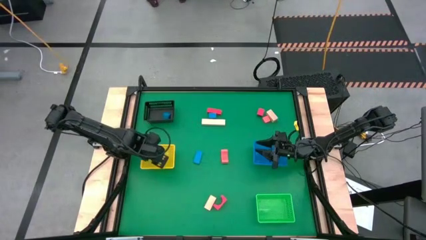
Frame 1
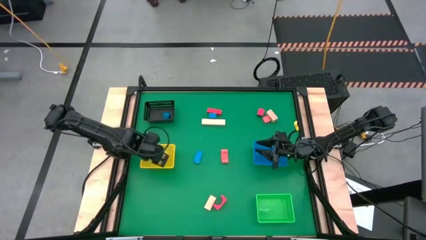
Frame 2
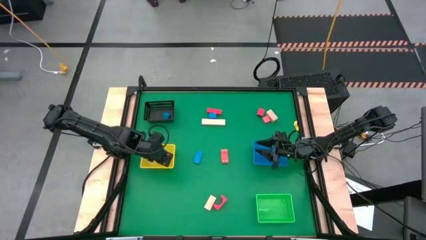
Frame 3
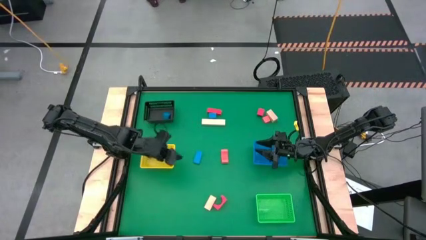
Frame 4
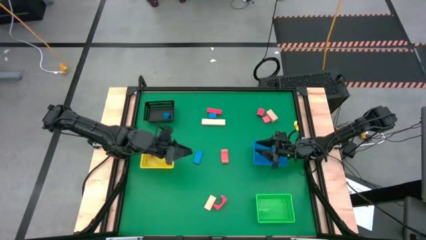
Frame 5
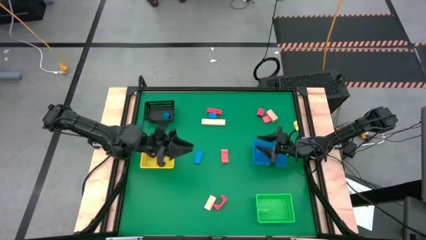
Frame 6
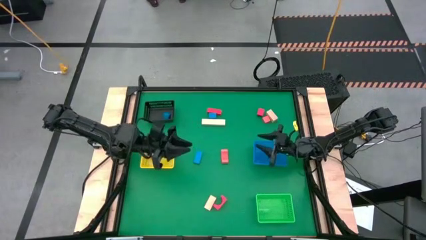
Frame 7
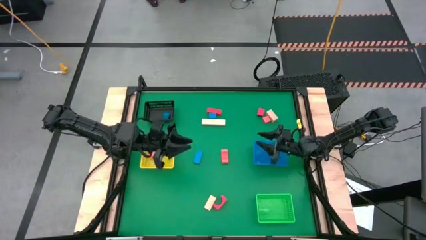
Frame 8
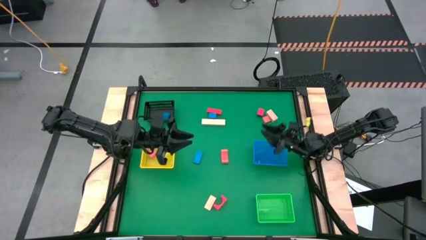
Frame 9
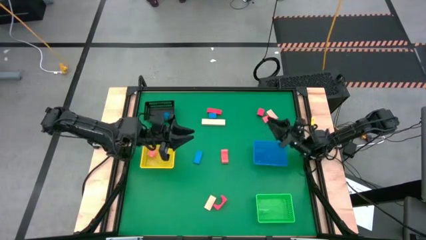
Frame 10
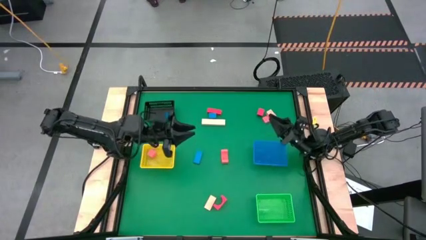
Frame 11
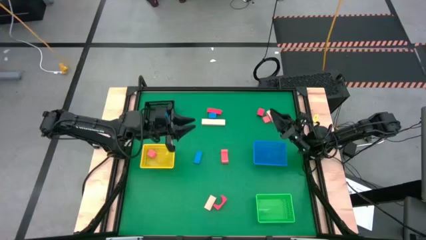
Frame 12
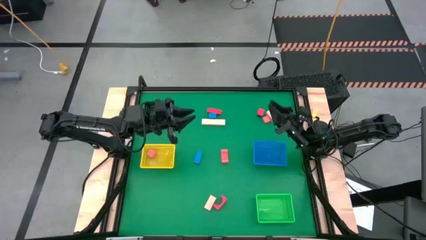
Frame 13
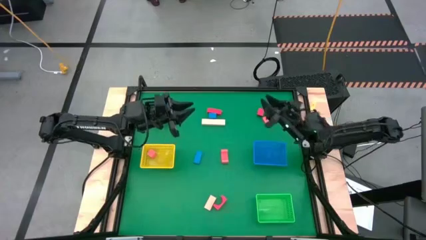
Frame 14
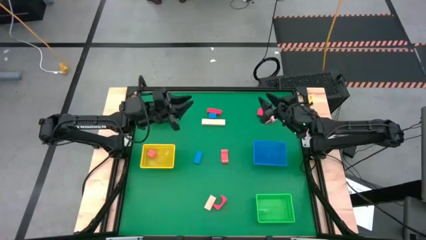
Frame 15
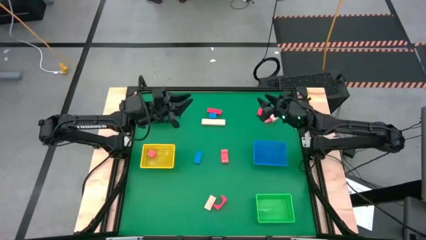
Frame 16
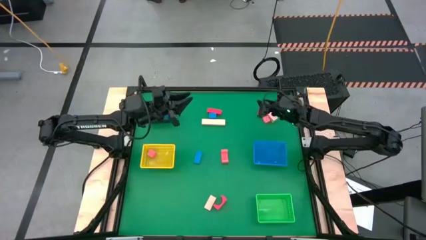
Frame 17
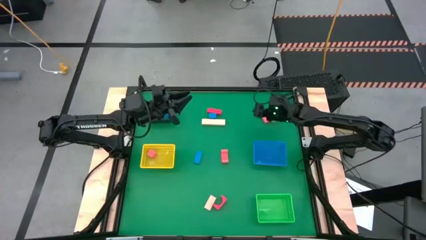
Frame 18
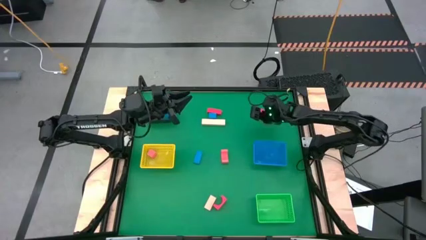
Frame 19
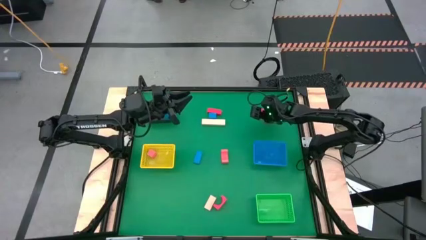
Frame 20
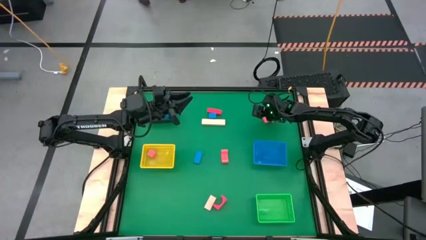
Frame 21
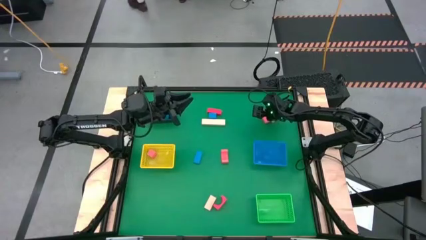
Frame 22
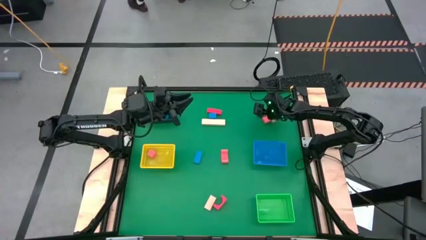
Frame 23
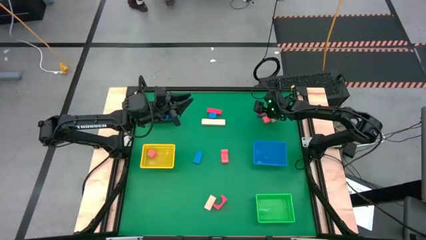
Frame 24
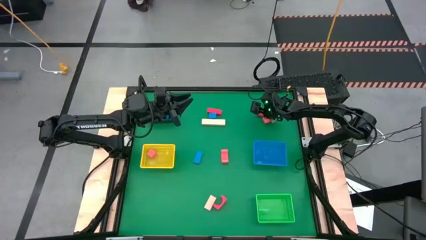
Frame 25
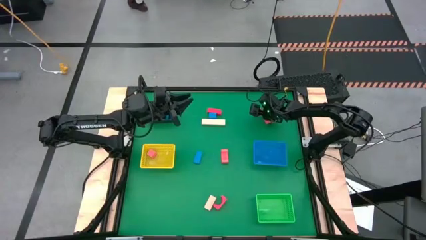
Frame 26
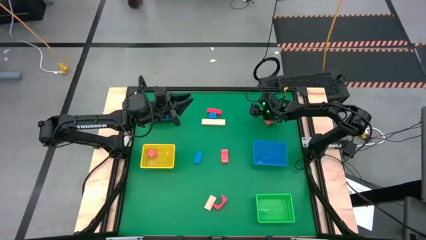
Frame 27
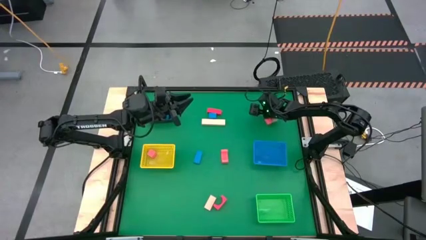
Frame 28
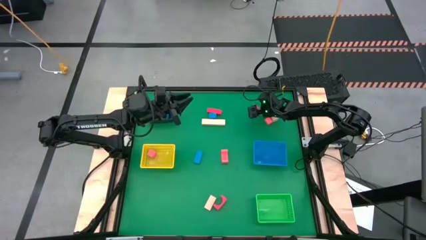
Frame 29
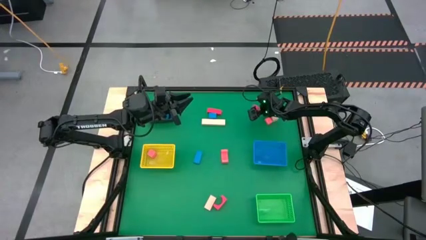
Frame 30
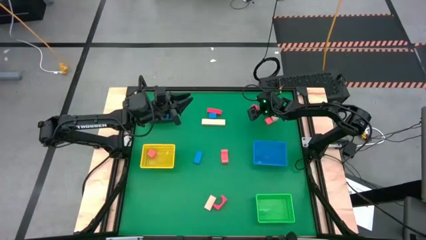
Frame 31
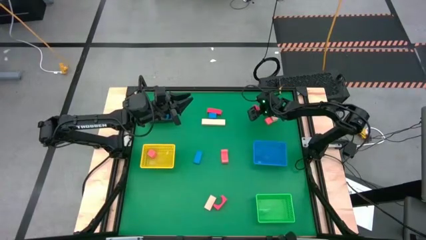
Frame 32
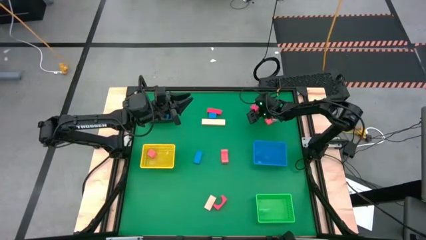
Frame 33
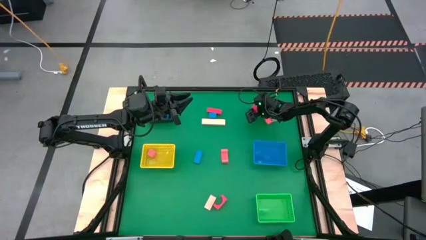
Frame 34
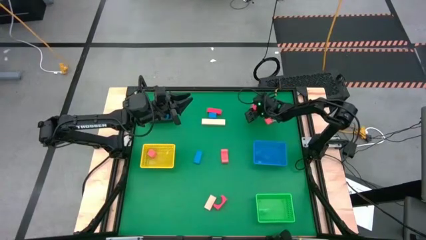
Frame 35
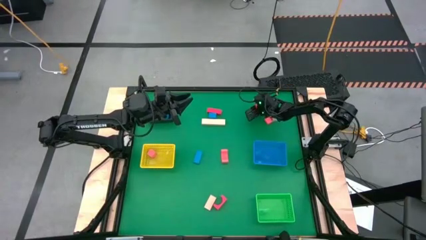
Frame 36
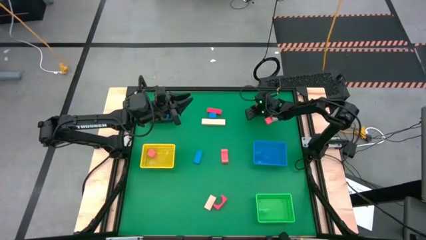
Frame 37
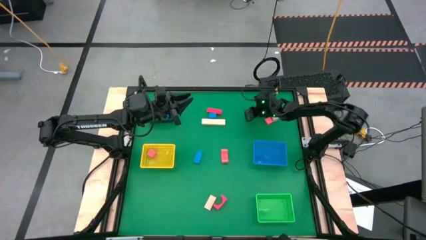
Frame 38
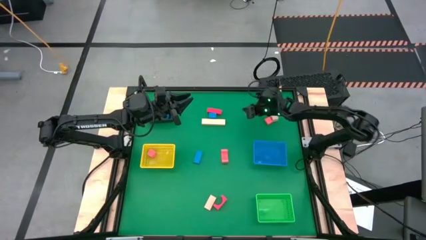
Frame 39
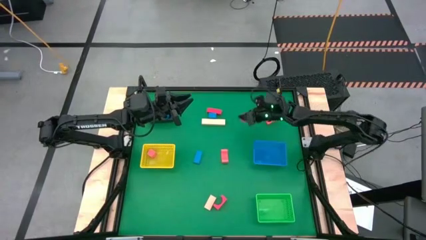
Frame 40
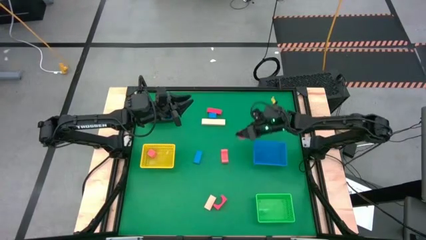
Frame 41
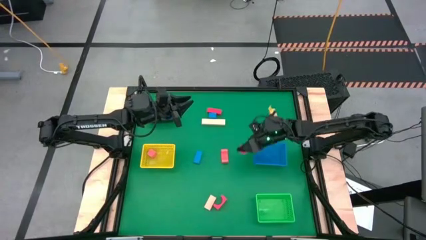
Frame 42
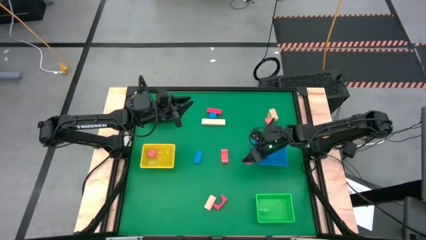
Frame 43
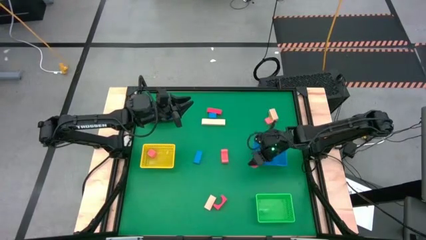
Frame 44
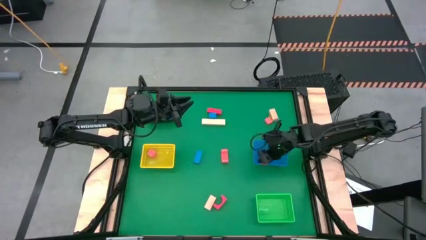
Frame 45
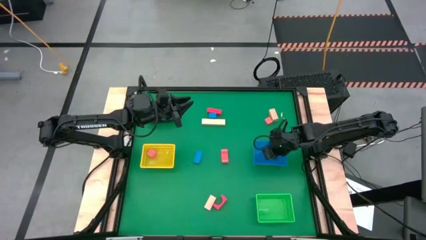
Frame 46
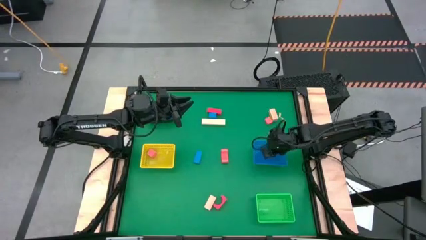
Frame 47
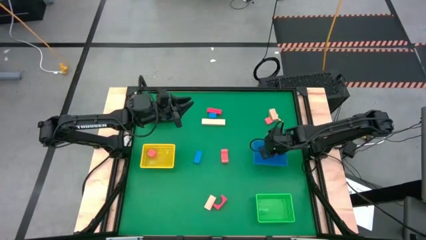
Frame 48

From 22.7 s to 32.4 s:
Task: Sort & place blocks by color
Put the red half-circle block into the blue basket

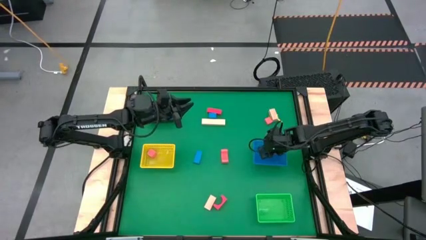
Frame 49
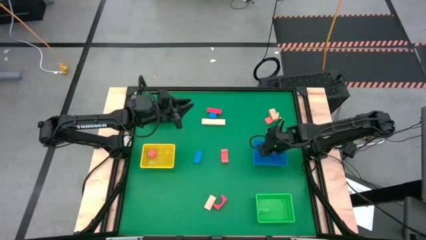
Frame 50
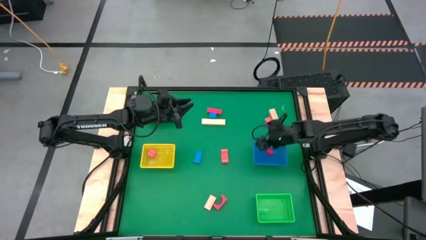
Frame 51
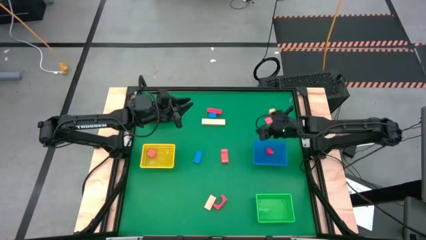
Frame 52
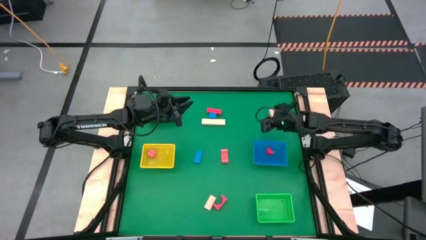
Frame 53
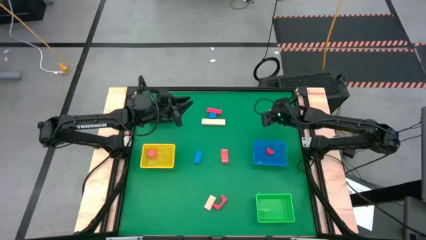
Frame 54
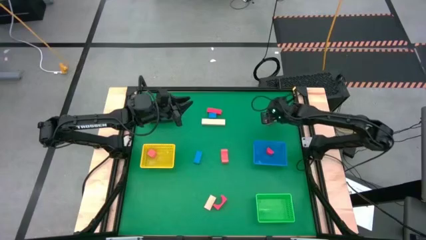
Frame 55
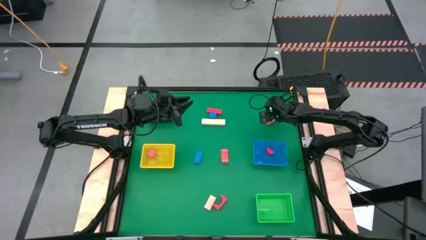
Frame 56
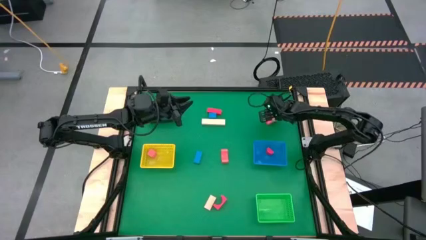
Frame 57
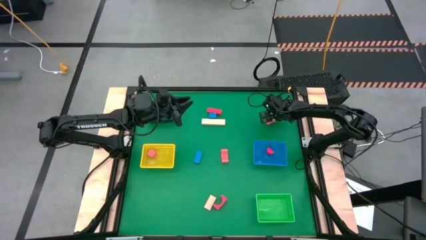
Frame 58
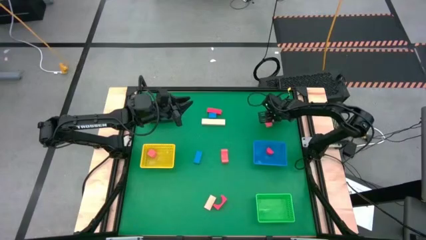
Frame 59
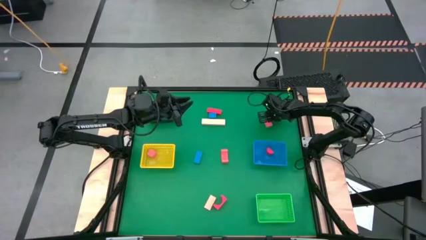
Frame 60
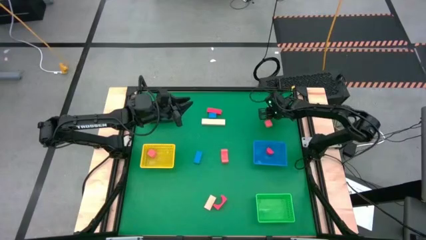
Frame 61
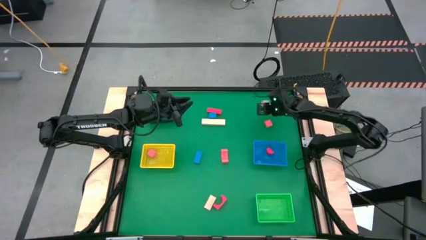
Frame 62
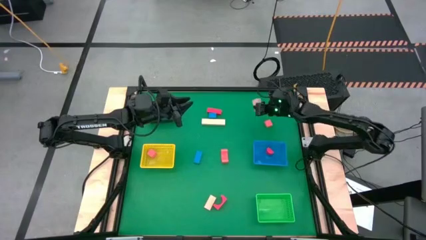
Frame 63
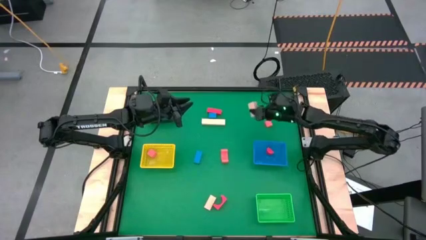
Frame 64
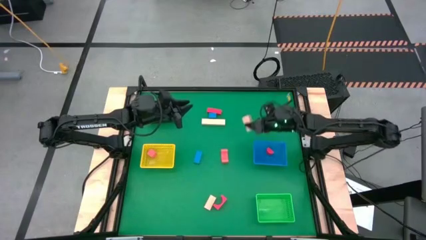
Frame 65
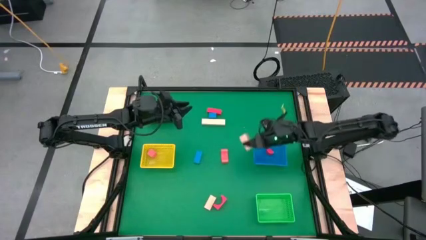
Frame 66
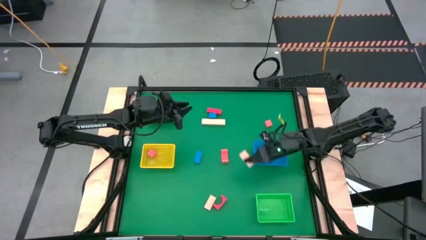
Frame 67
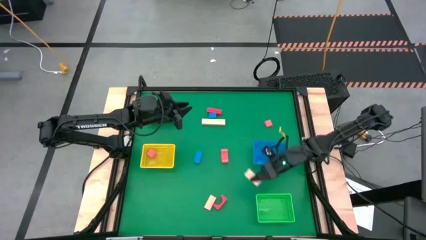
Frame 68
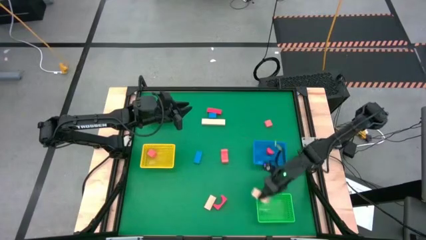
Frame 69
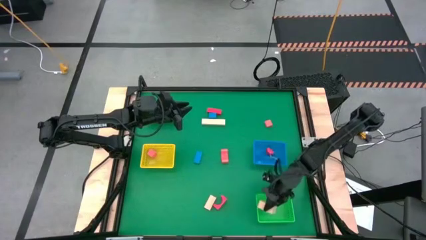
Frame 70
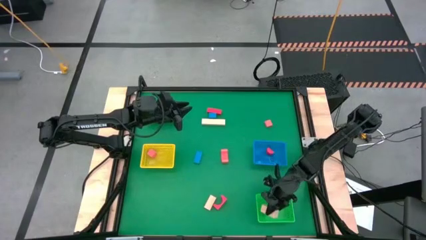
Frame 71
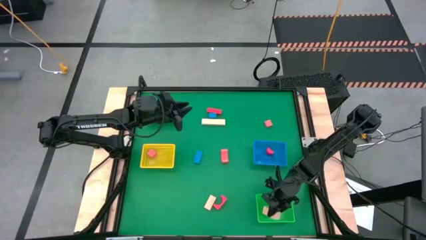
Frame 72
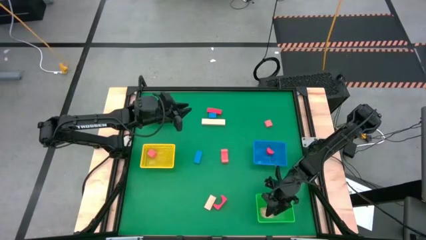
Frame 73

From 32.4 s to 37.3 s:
Put the top right beige rectangular block into the green basket
